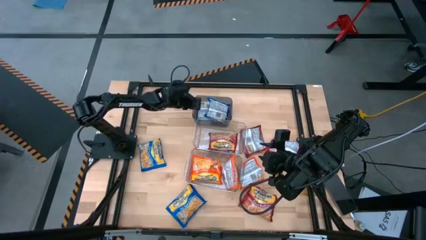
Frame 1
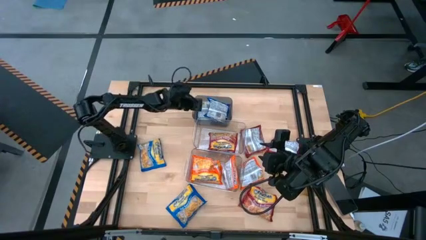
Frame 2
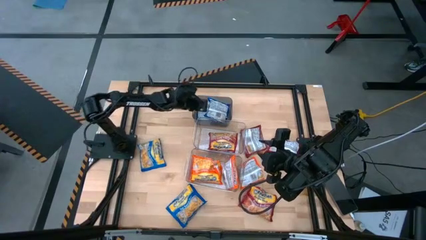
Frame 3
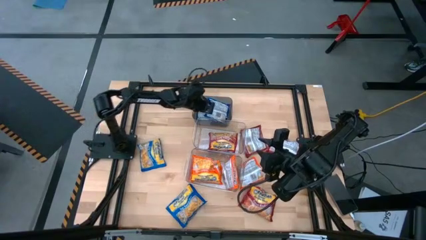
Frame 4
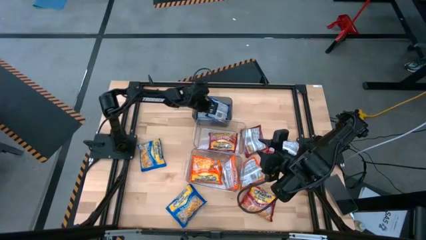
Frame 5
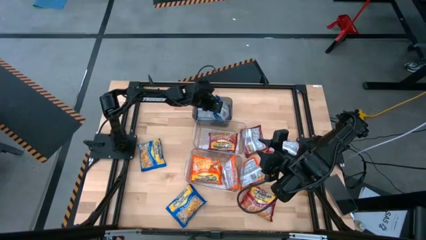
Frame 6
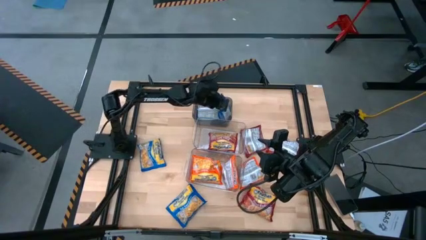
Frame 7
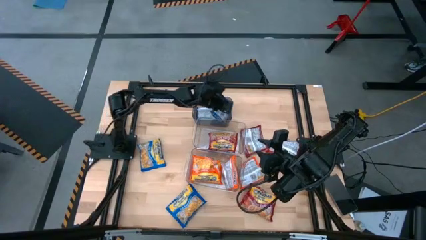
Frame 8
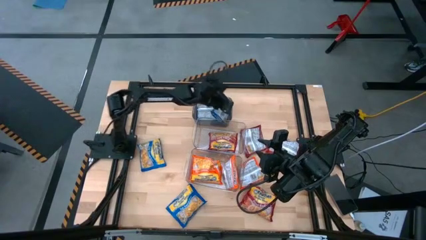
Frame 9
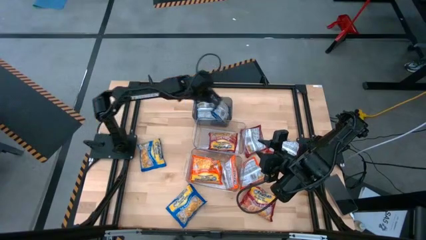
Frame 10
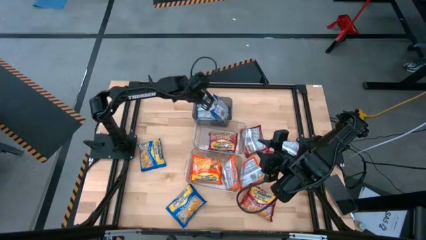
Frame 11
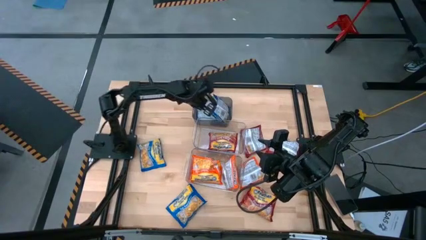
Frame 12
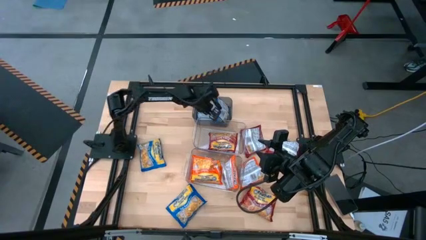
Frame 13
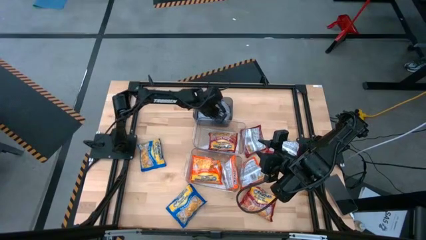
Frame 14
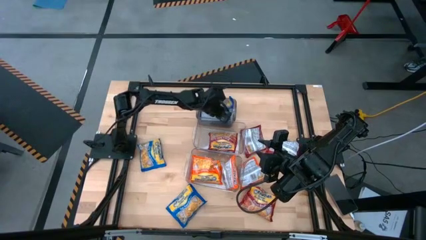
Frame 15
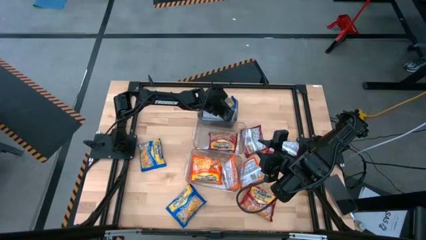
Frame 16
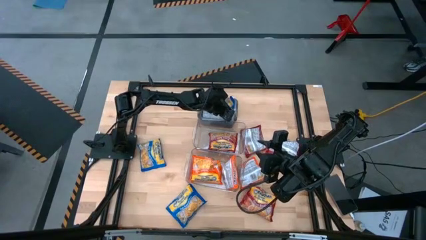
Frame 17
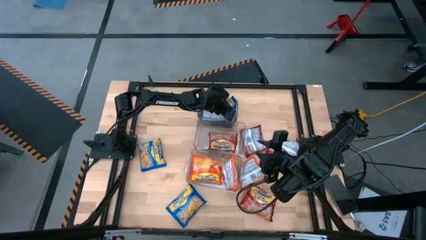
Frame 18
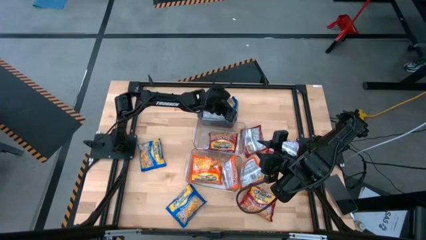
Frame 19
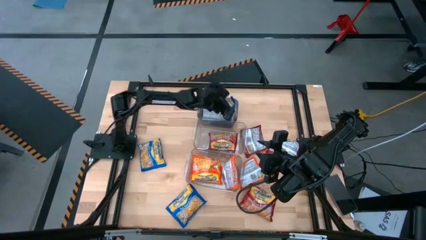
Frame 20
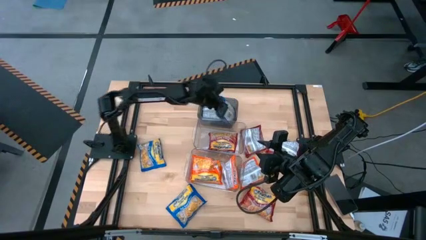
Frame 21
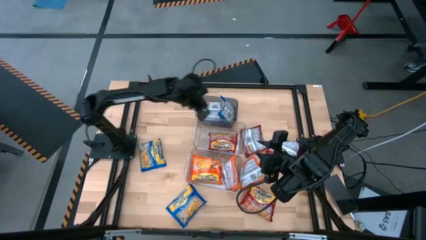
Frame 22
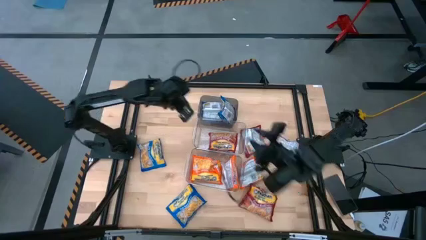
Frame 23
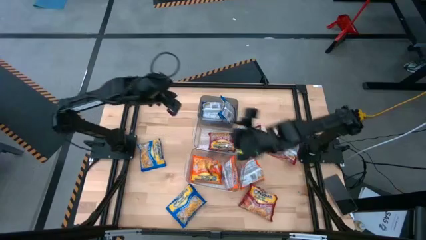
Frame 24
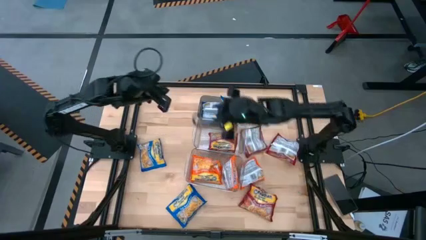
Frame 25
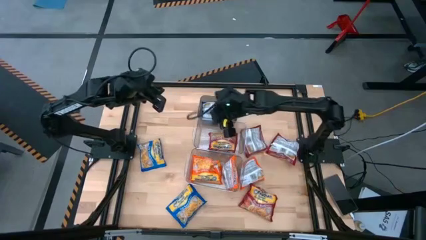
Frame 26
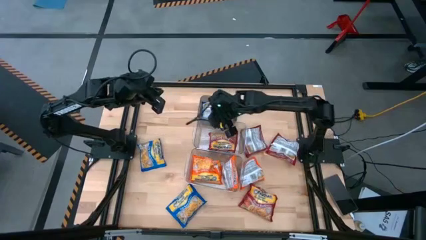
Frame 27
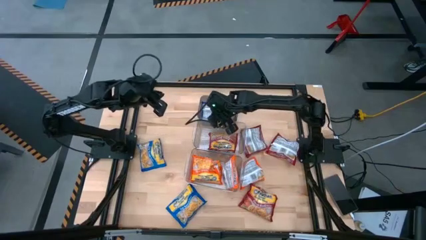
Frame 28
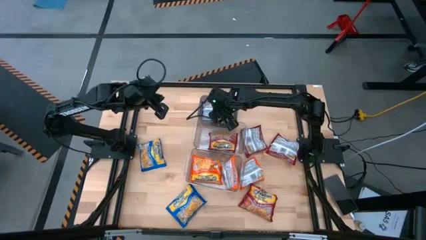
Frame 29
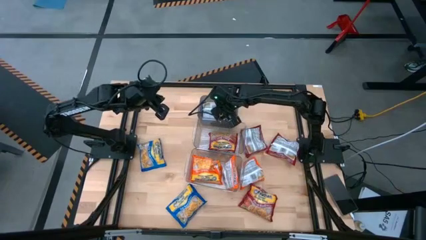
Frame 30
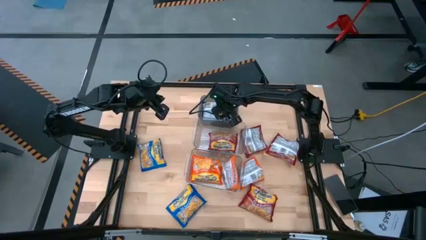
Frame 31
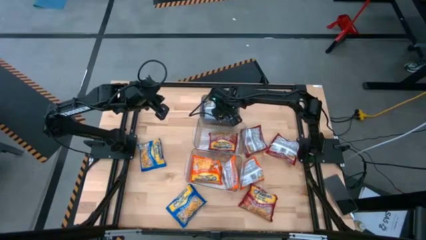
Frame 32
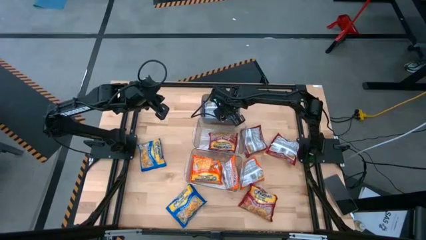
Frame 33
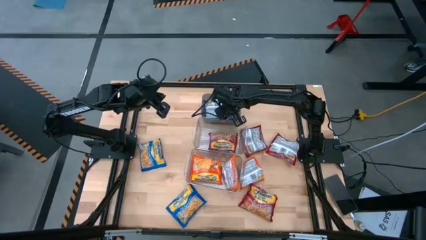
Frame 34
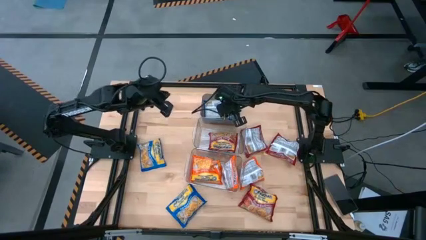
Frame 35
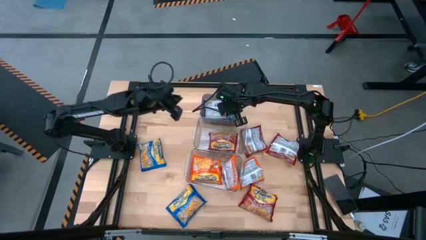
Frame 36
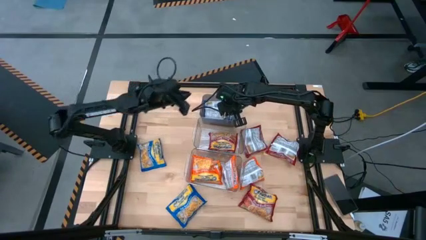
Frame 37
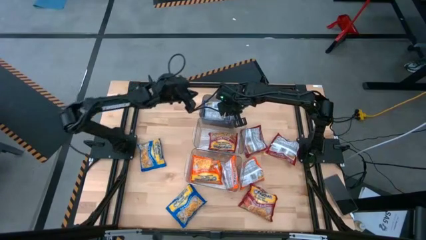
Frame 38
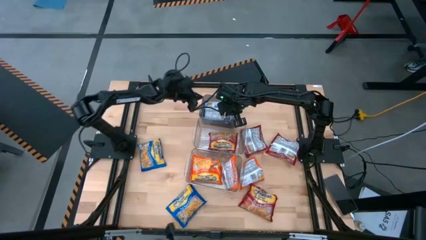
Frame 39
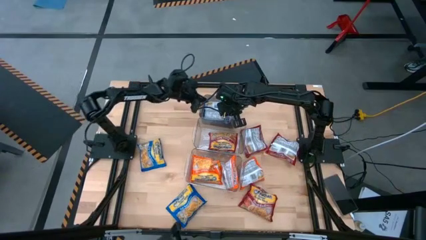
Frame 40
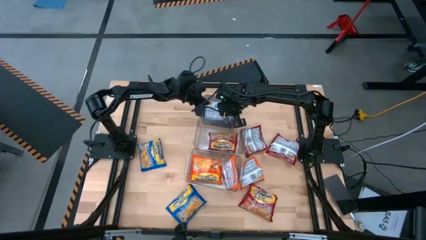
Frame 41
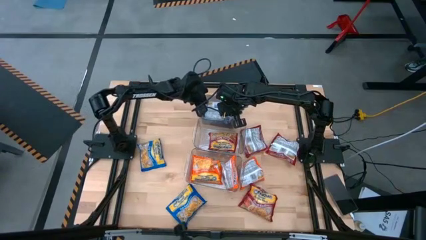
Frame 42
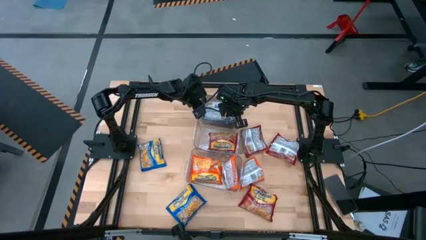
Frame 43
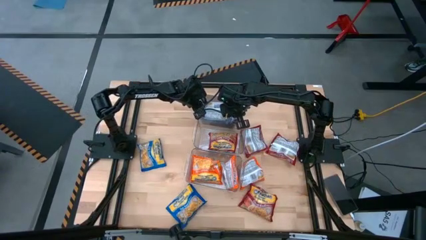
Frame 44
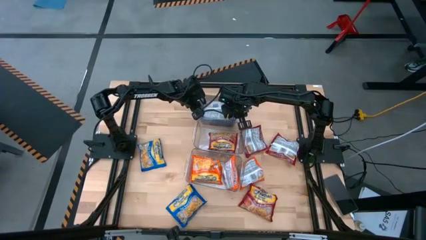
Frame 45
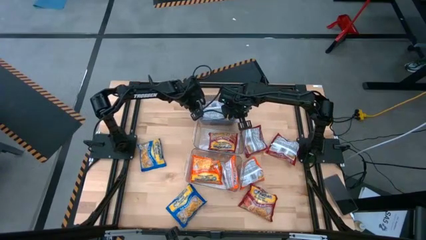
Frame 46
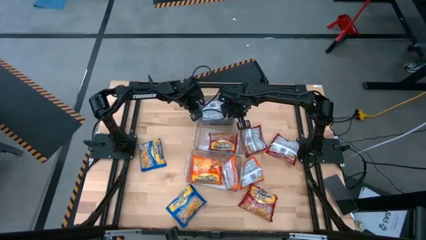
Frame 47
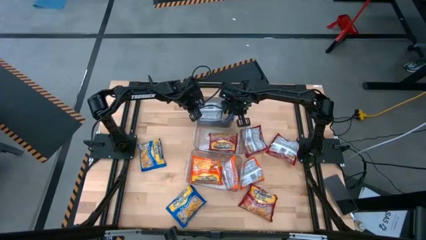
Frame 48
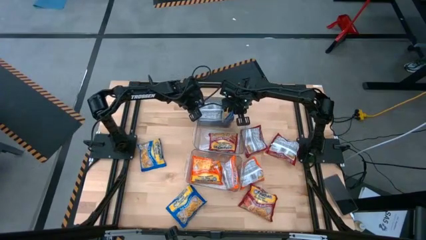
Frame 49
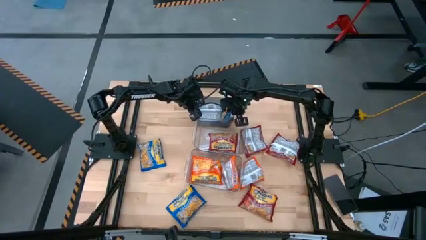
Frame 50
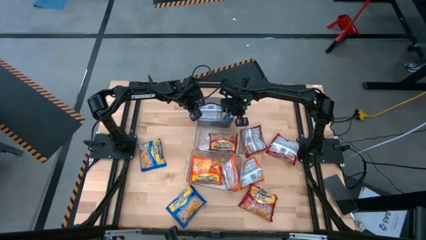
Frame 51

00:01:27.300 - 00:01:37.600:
Task: Sort Maruchan noodles
Put the middle left blue noddle pack into the black bin
